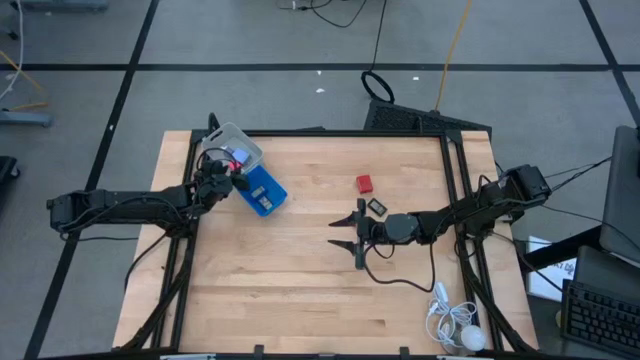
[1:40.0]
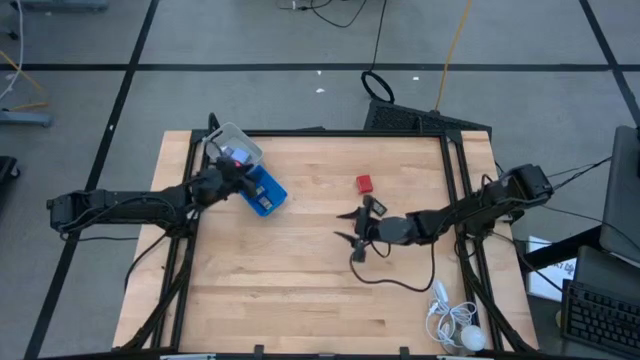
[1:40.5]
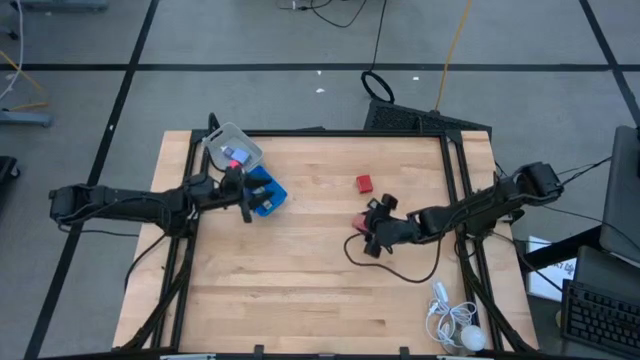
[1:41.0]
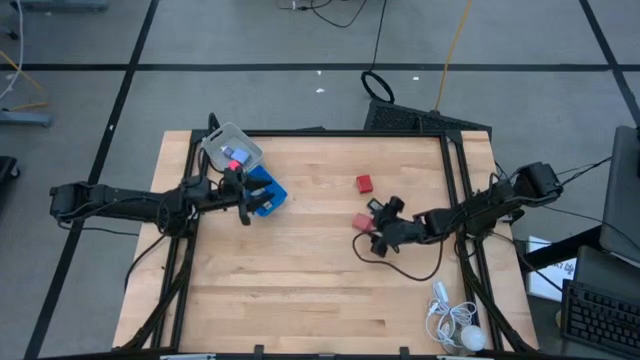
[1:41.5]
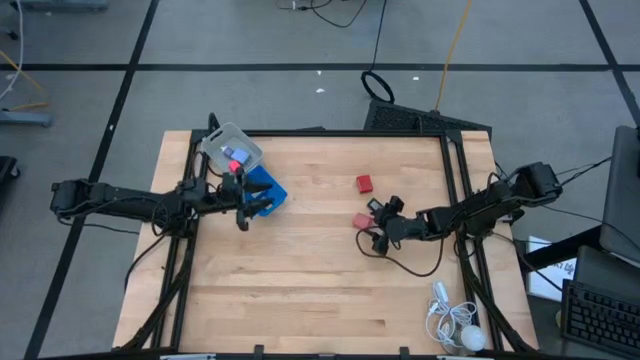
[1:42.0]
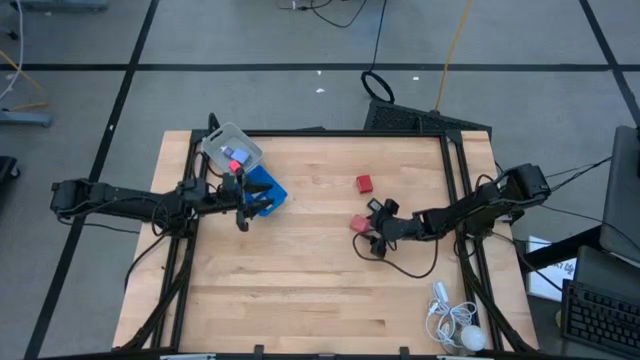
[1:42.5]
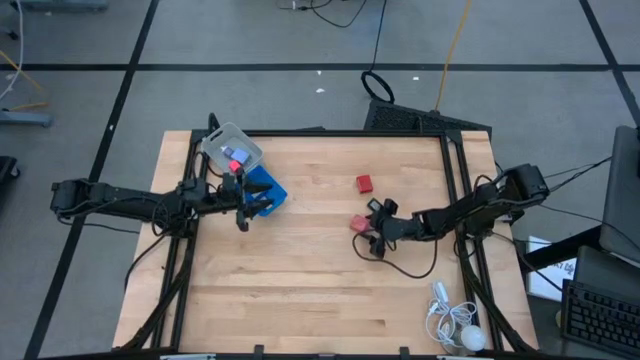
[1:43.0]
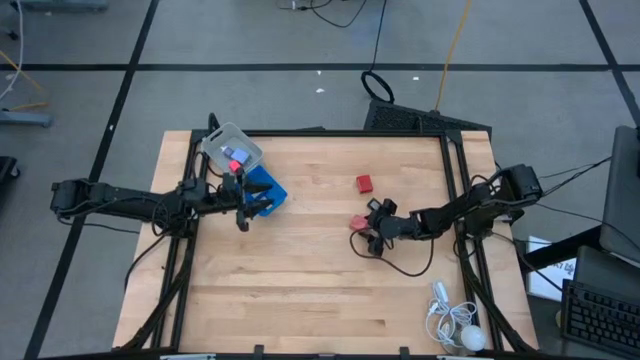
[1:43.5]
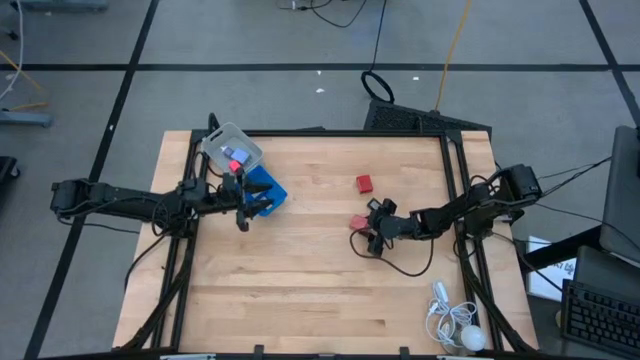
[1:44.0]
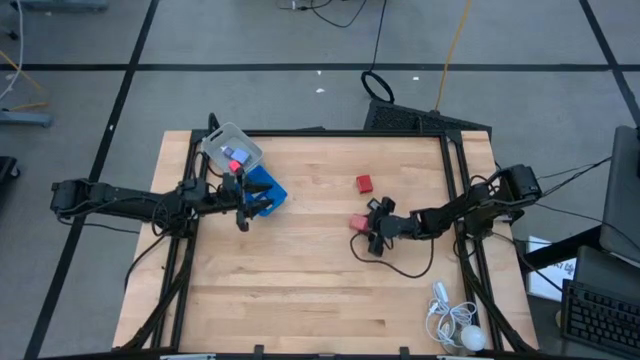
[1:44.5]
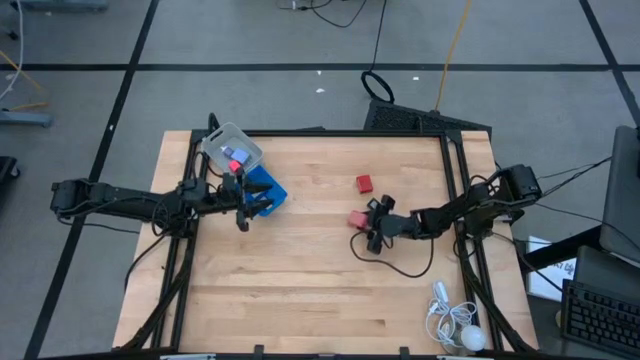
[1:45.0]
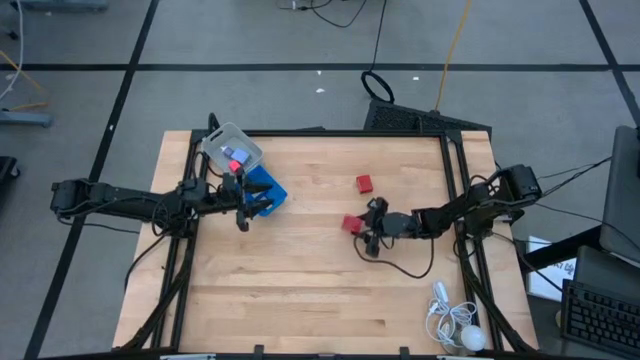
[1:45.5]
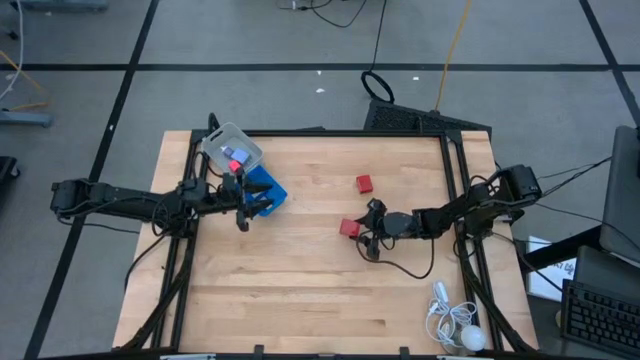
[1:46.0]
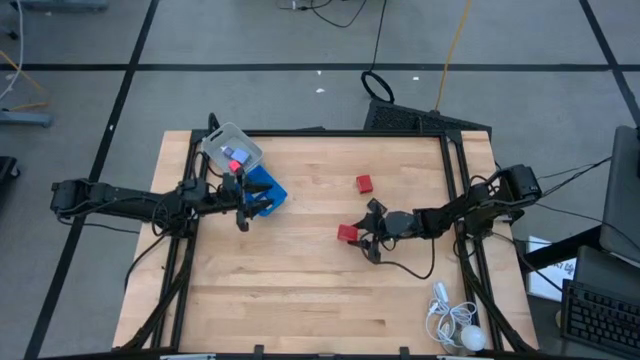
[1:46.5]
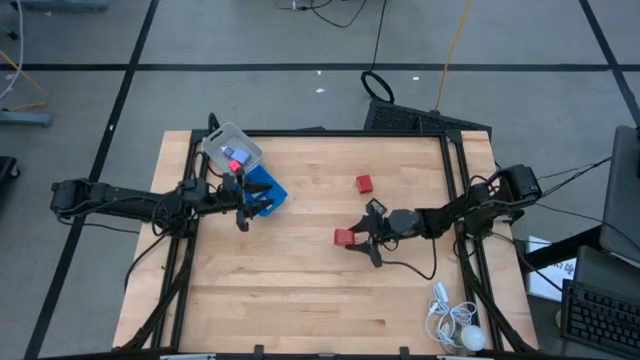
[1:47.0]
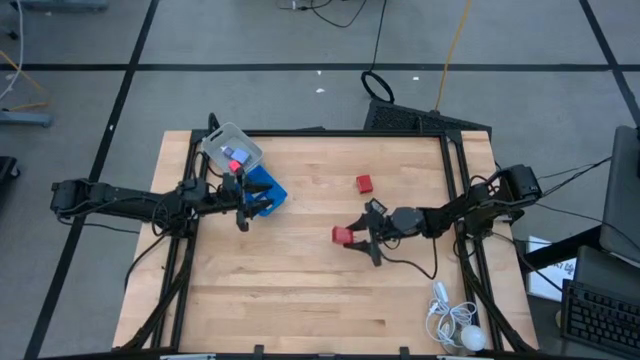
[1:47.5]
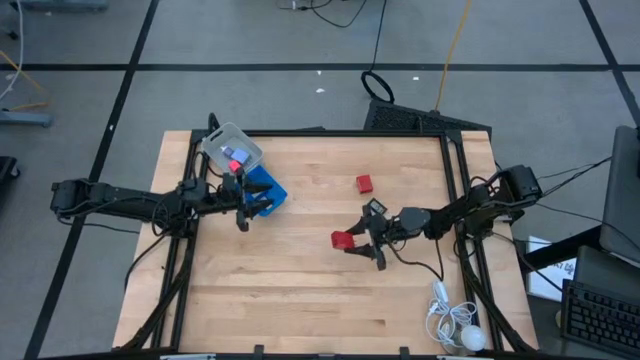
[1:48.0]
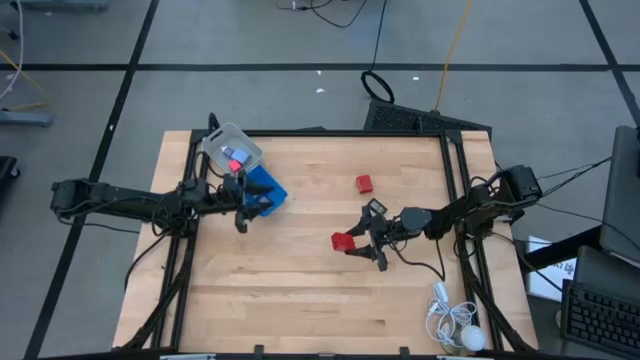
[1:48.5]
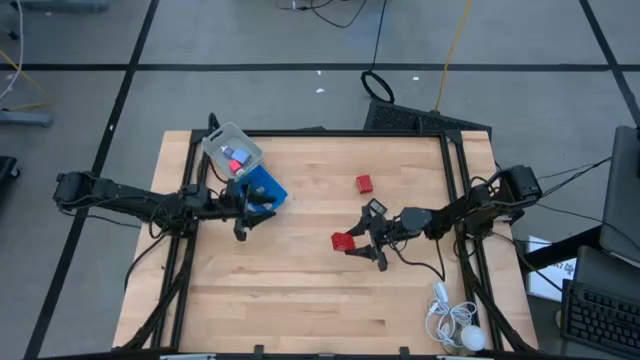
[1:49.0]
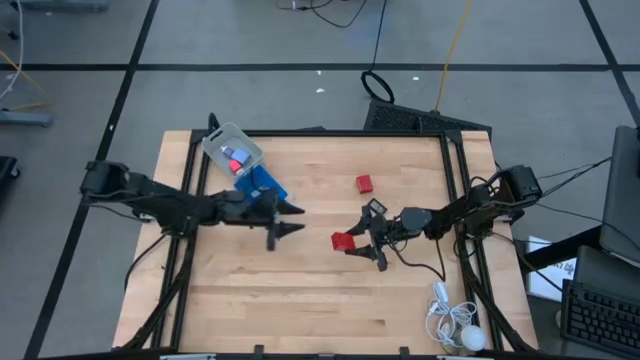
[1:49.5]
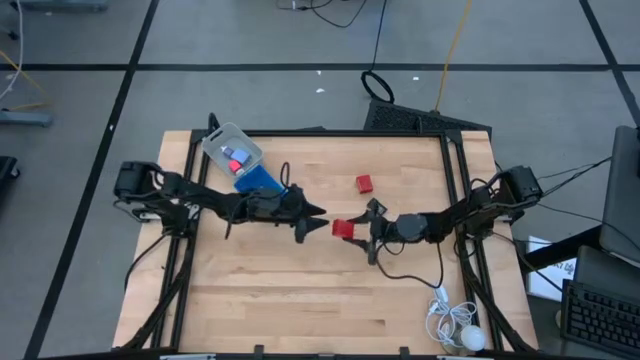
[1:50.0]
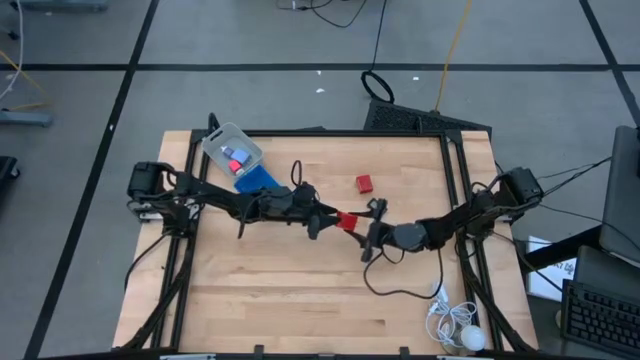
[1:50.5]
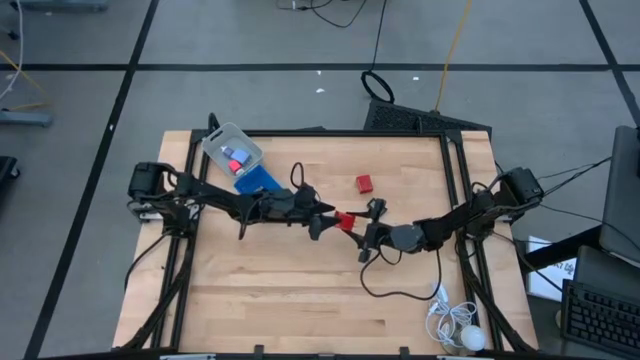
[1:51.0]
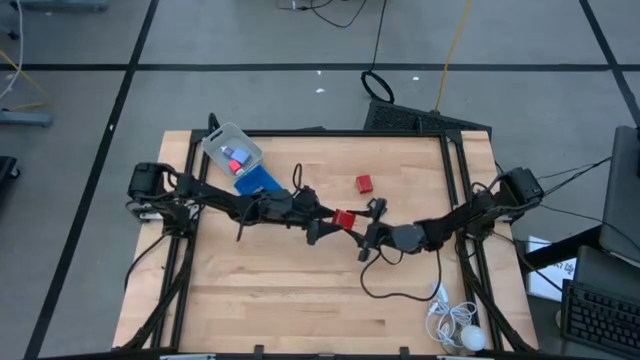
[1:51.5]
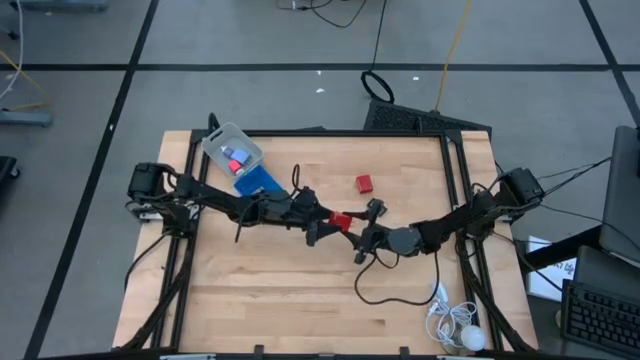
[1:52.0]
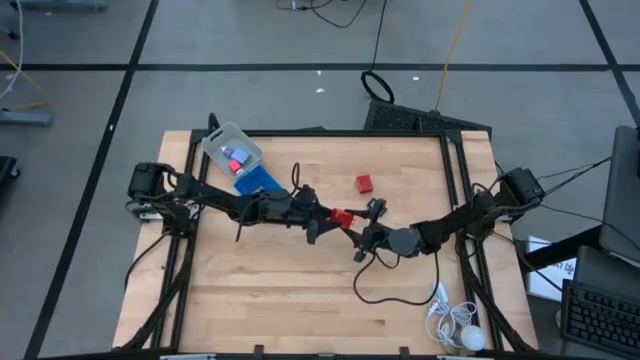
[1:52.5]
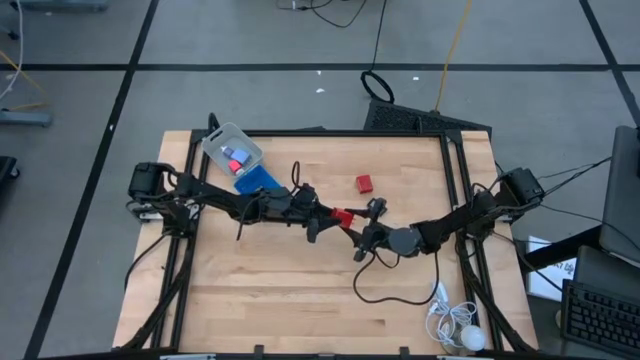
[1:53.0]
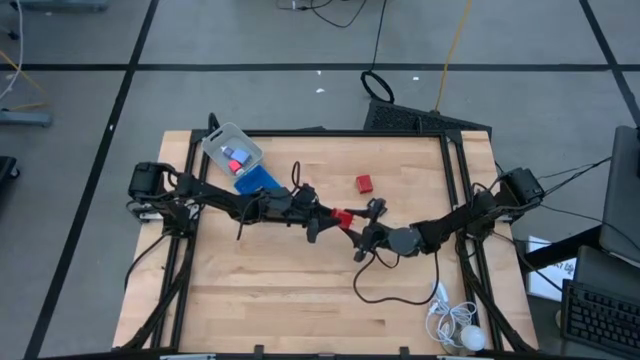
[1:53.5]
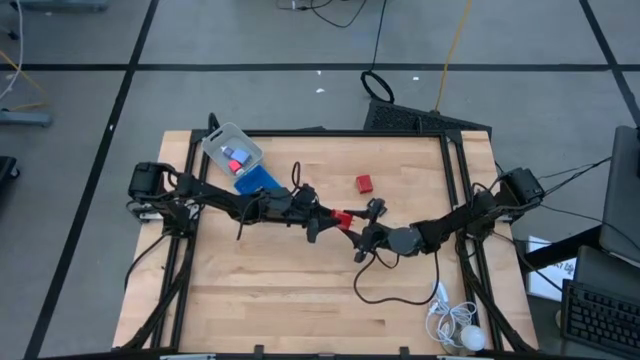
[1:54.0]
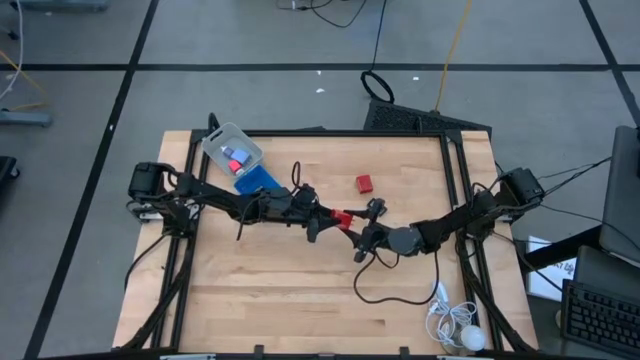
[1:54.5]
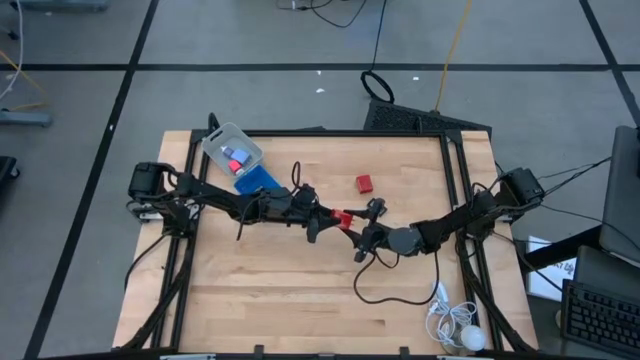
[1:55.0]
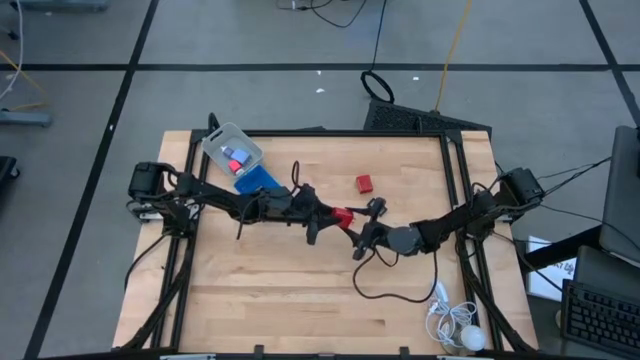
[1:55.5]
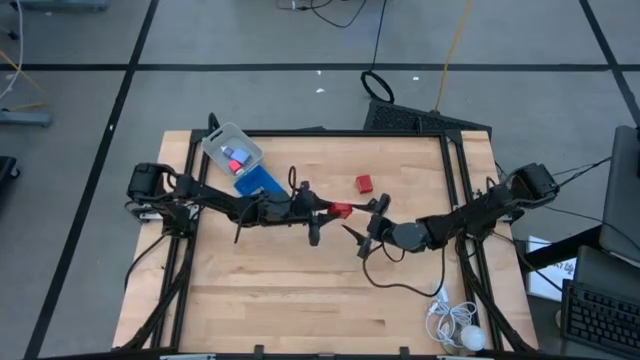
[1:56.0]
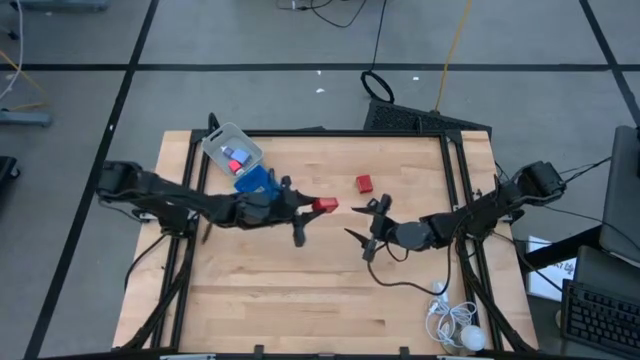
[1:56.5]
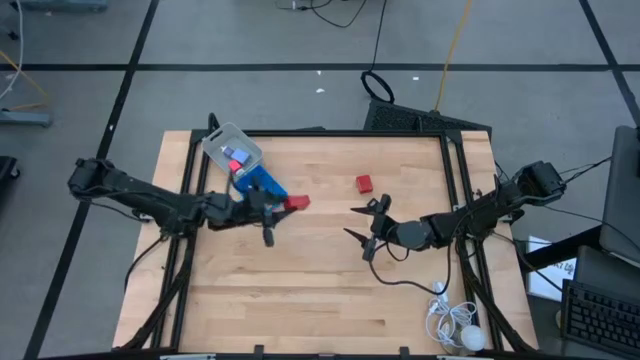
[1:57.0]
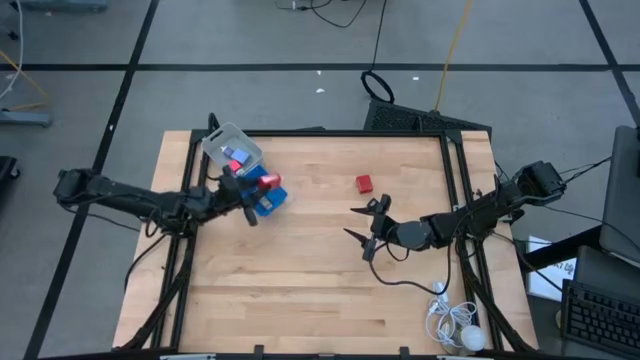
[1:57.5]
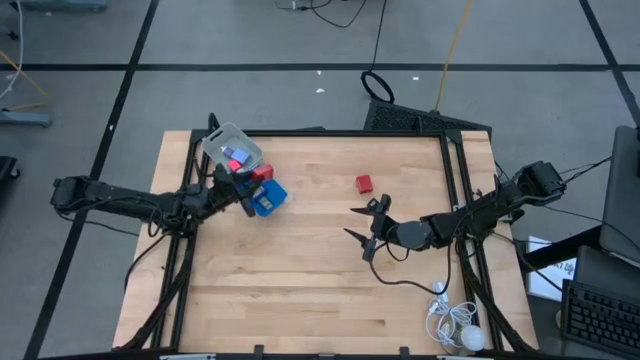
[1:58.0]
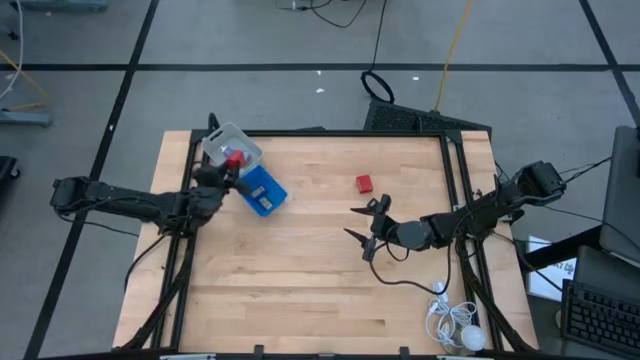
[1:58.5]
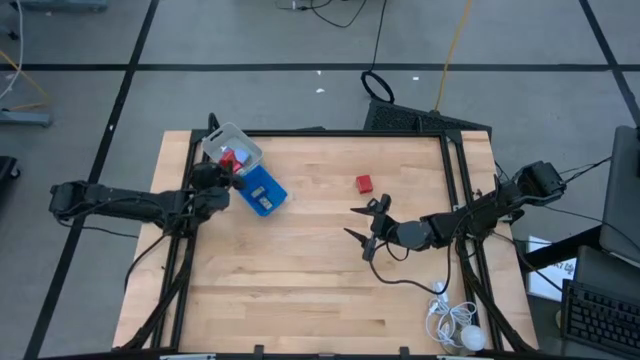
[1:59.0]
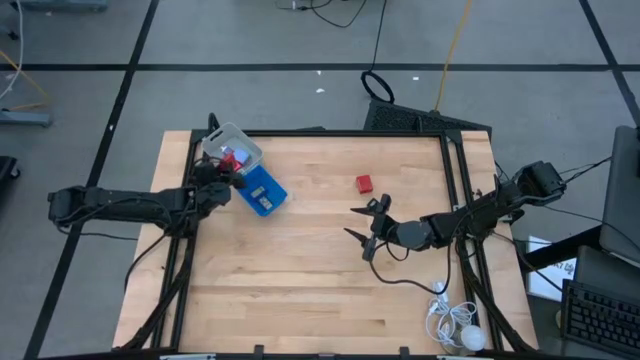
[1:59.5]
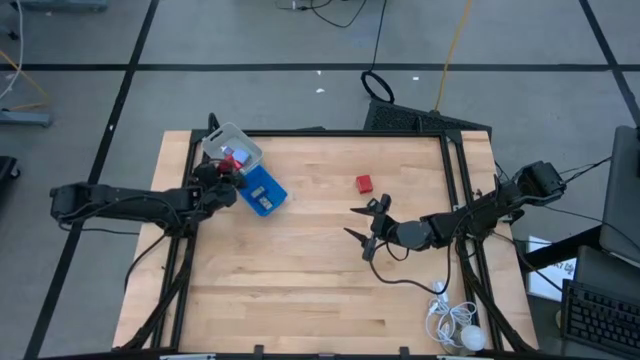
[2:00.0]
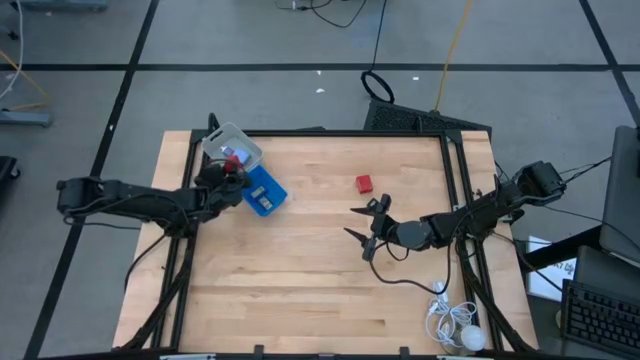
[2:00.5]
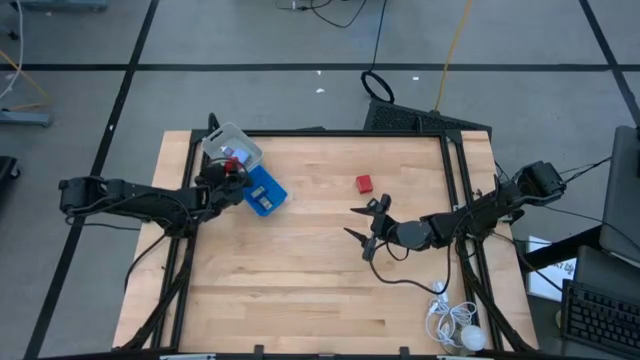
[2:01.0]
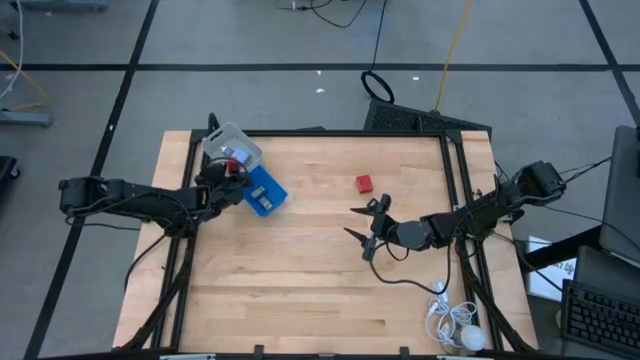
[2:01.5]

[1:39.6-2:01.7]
Task: Pick & Place Office items
Put the bottom red charger adapter into the gray bin
